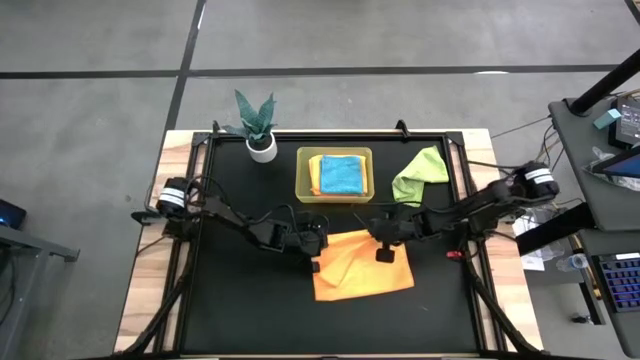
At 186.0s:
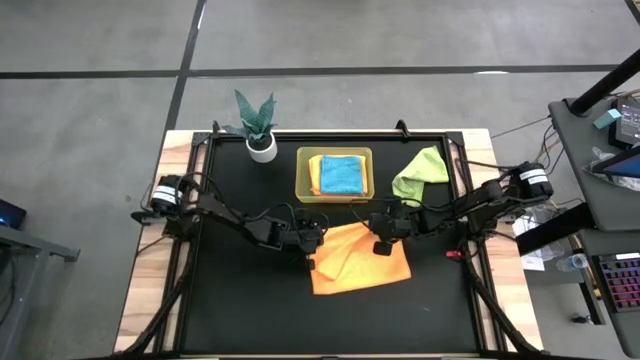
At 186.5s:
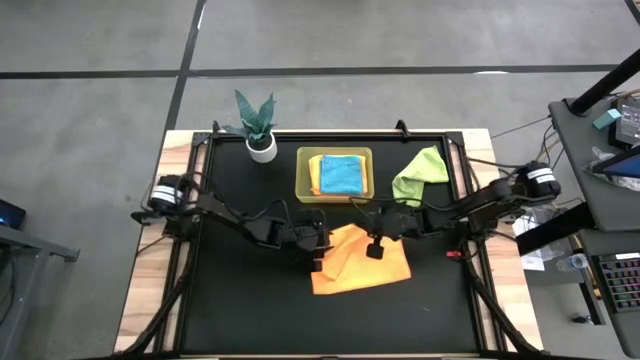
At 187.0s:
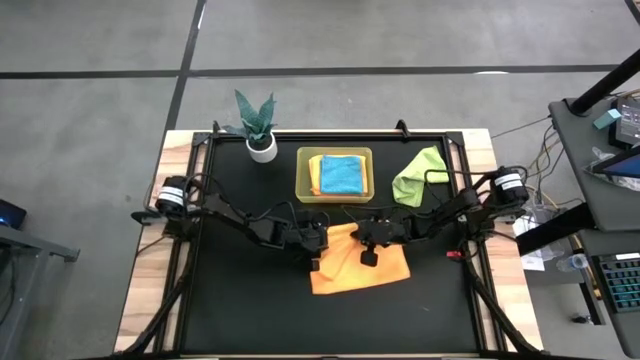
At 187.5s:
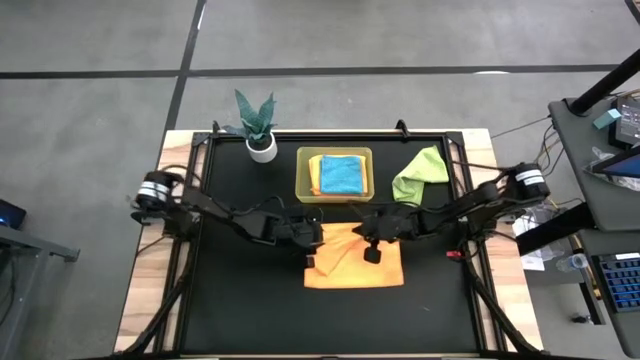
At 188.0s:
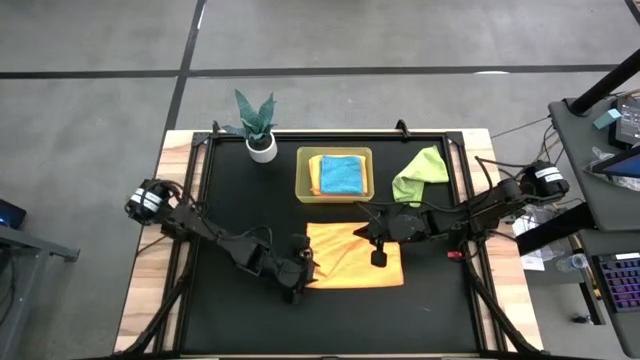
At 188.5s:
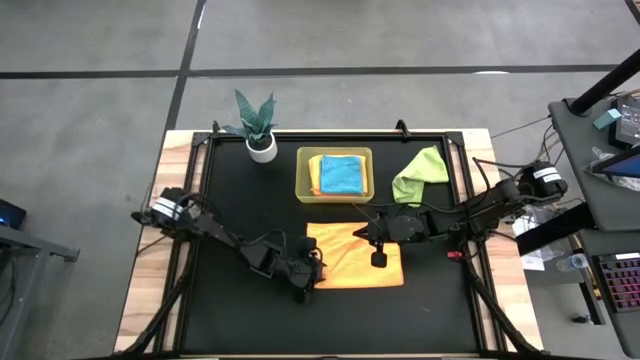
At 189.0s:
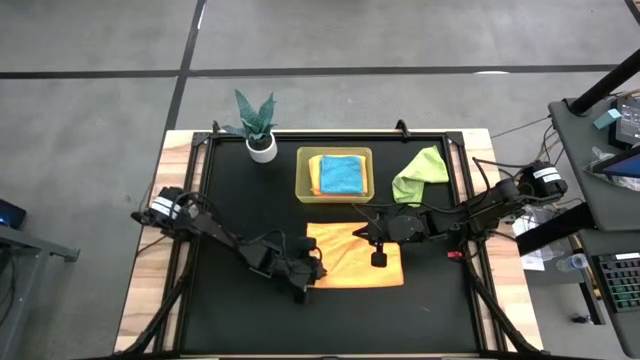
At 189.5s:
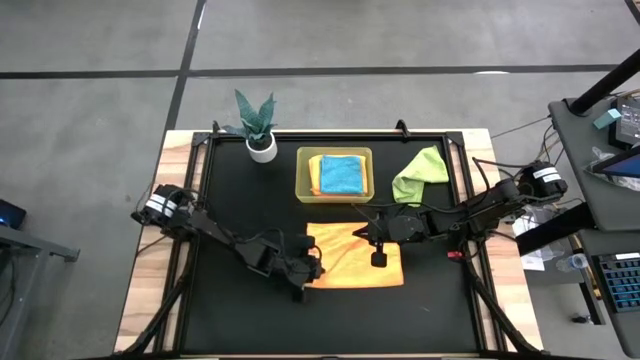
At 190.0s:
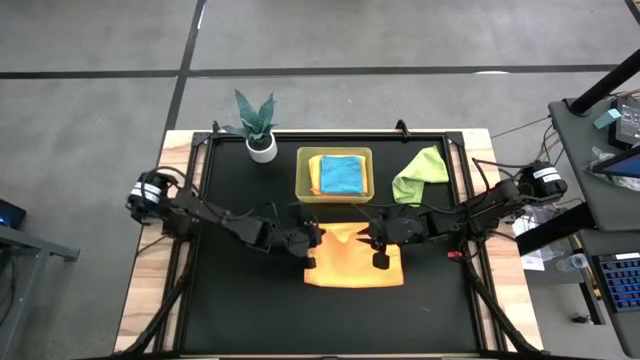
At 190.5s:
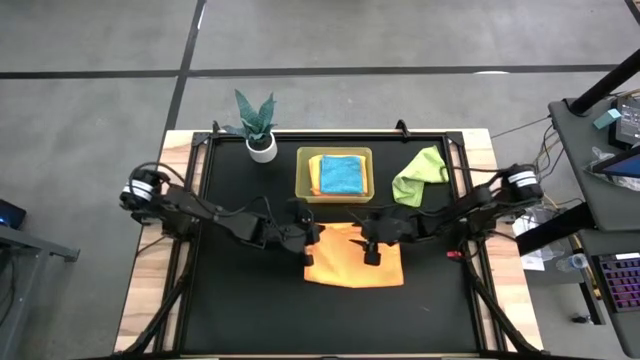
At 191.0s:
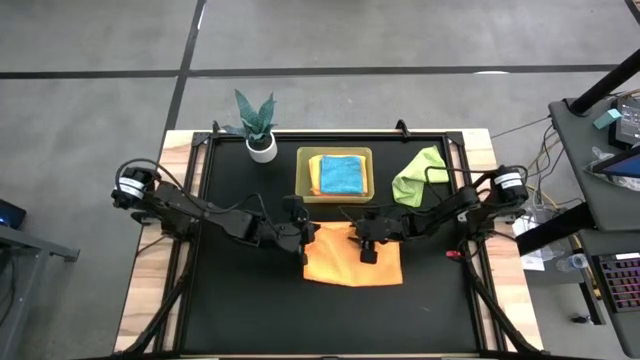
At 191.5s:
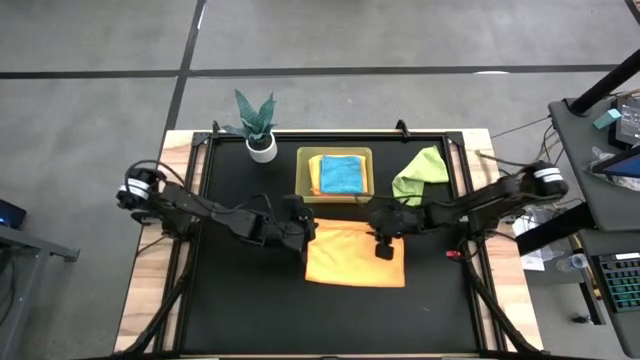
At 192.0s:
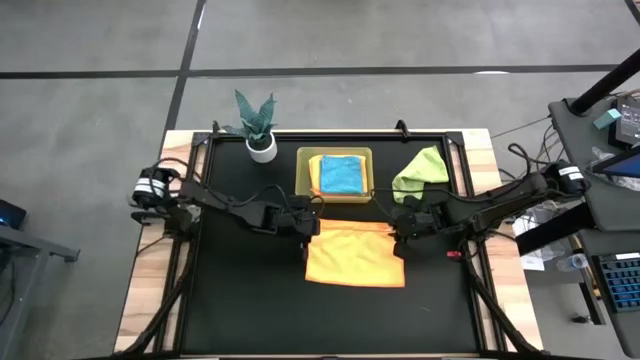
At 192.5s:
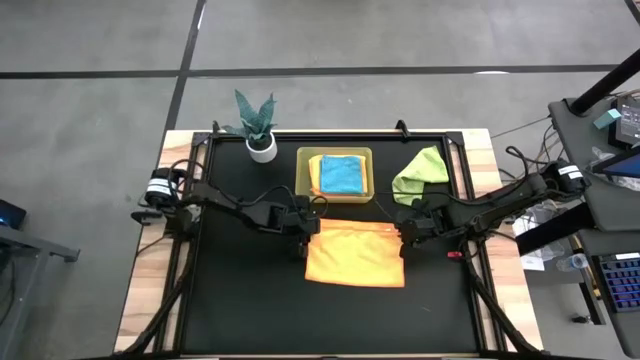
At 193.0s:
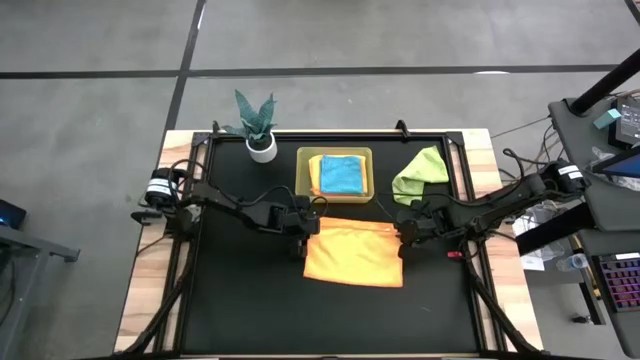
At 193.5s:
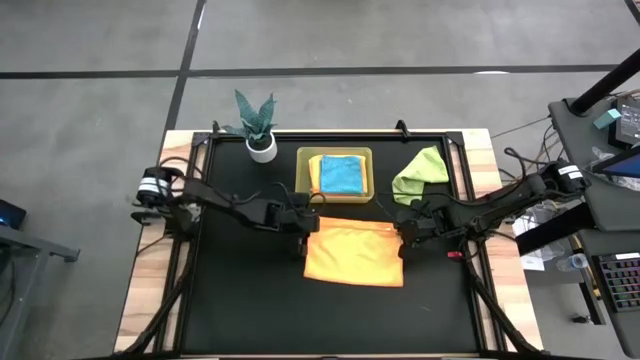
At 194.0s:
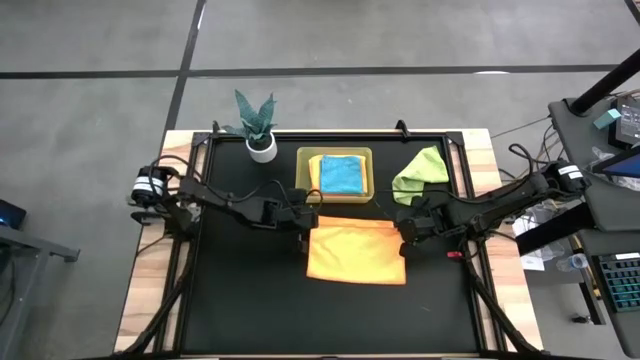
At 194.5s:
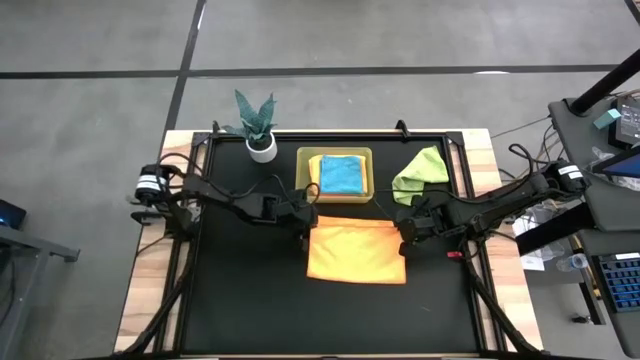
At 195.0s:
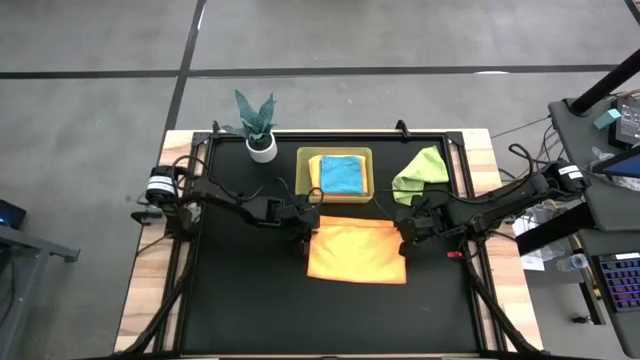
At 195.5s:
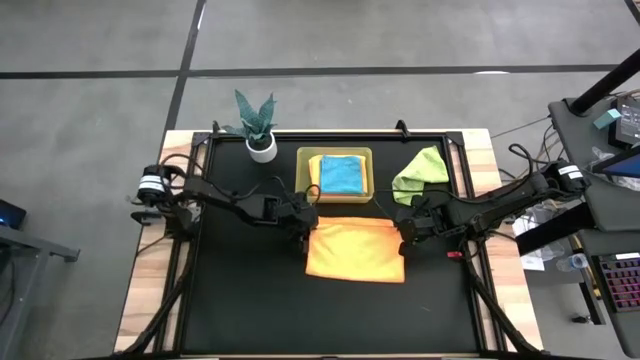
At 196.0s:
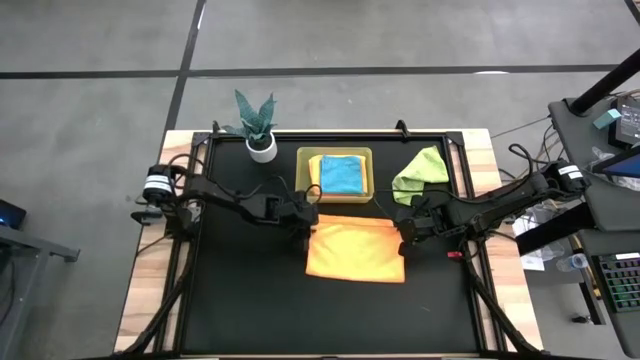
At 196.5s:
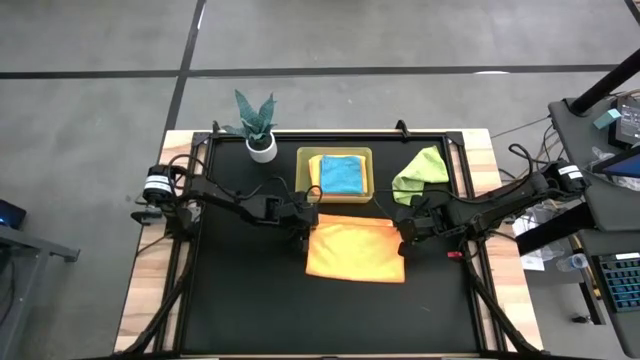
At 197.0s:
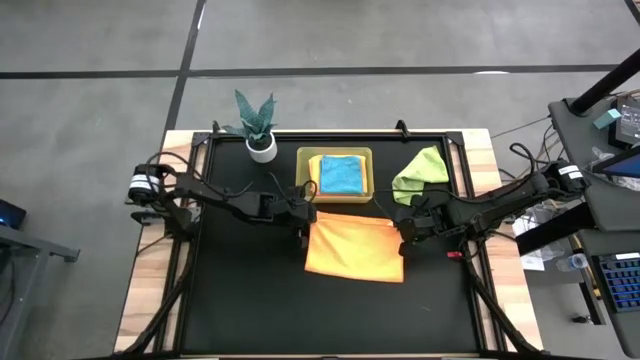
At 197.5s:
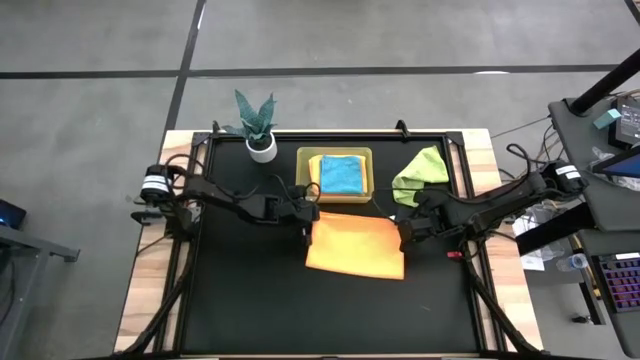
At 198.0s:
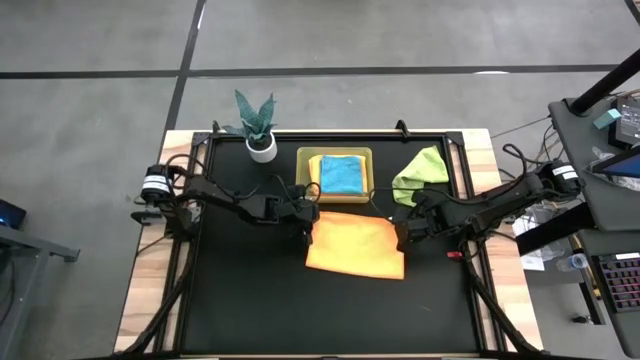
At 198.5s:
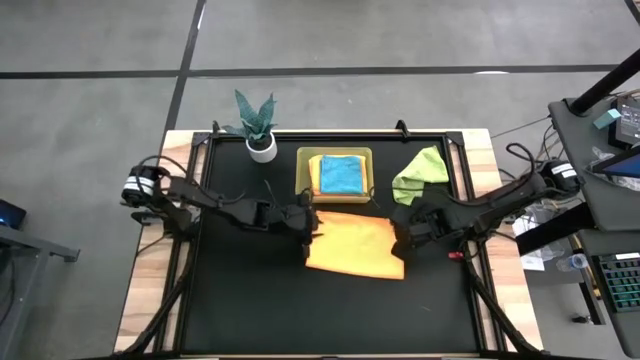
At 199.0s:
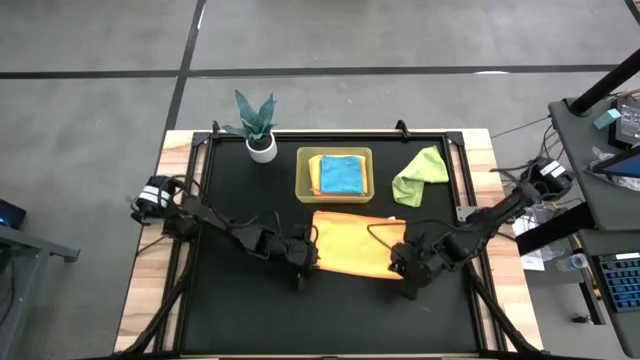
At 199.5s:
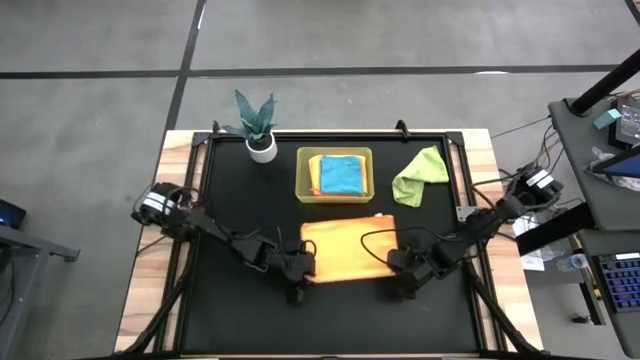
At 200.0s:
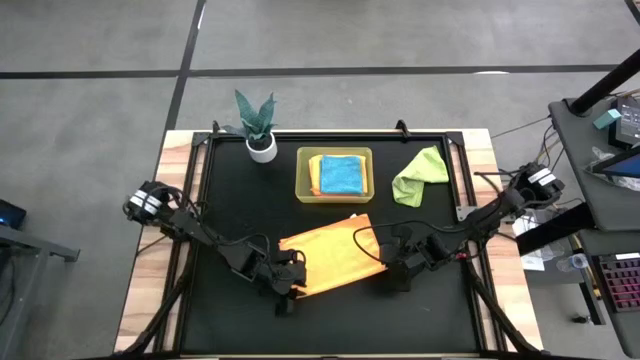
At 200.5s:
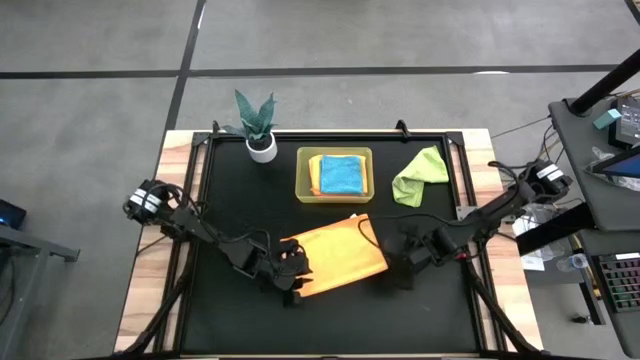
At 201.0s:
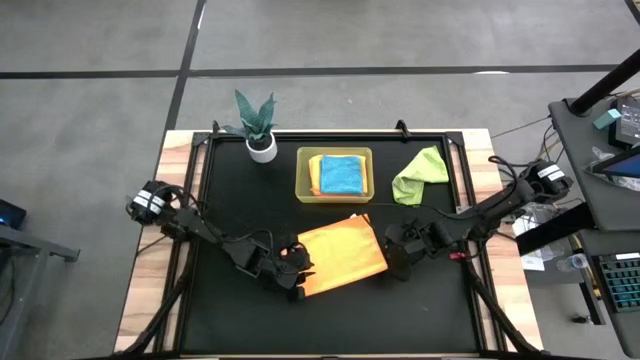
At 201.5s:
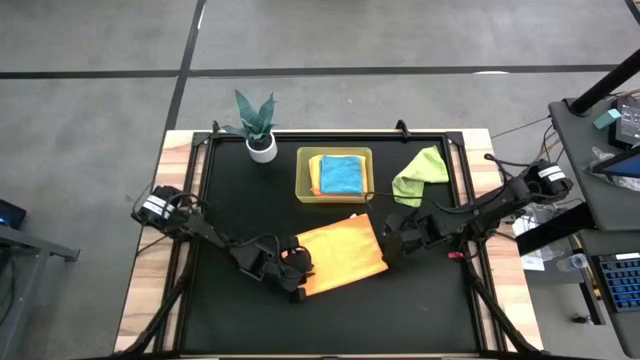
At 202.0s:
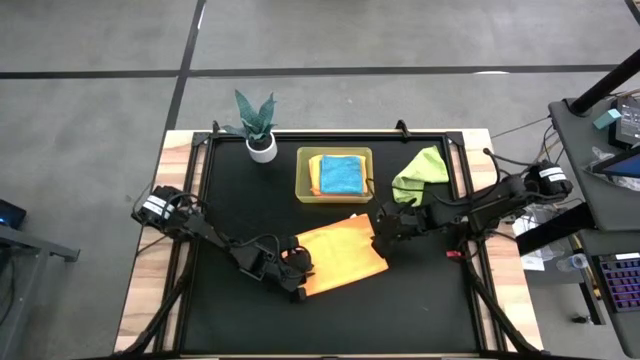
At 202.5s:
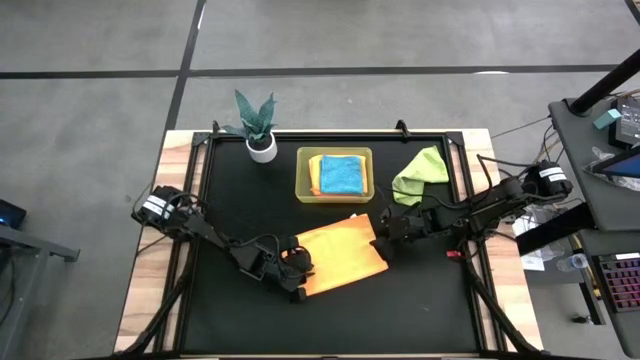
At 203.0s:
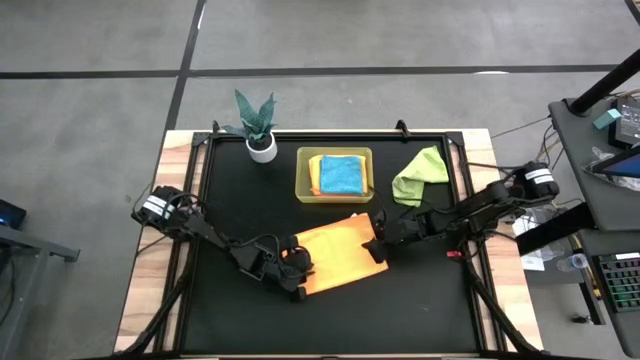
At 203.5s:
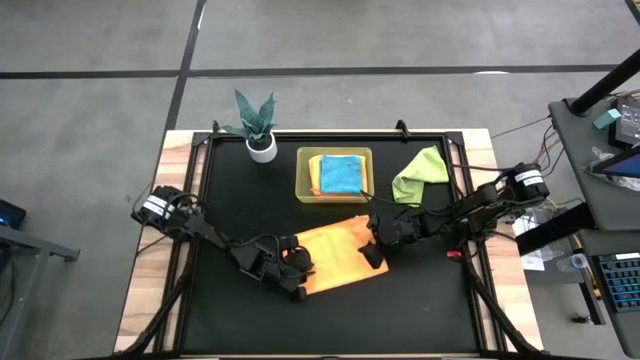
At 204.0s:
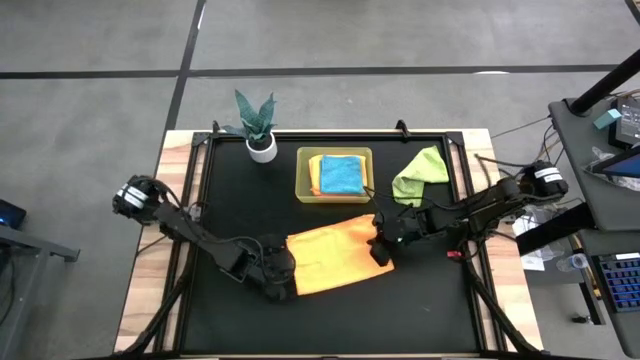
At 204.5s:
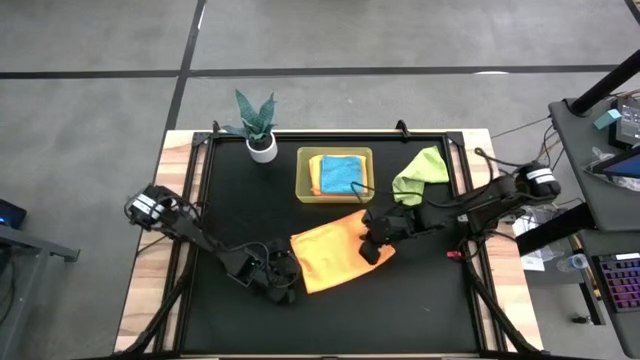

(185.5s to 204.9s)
Task: Fold microfiber towels
Fold the yellow towel on the table
